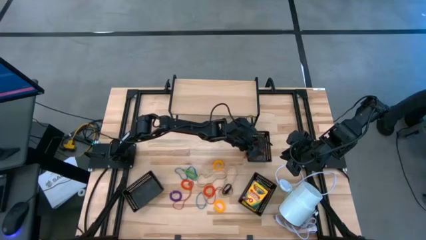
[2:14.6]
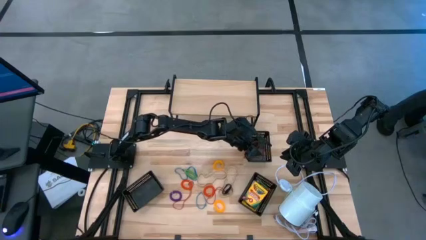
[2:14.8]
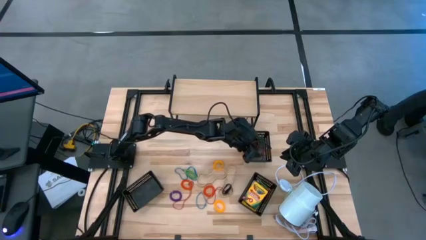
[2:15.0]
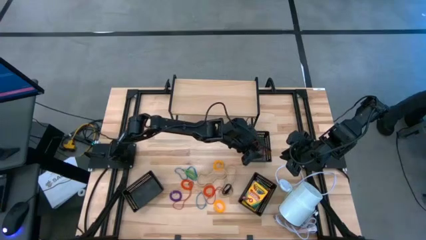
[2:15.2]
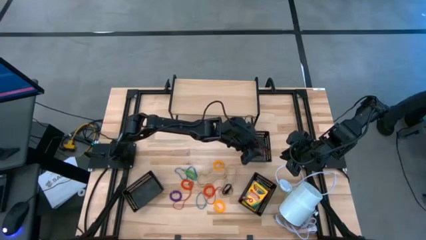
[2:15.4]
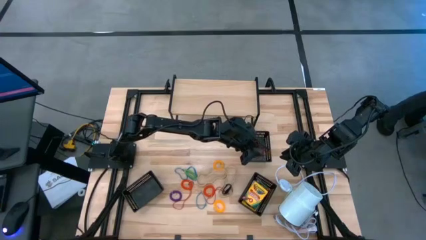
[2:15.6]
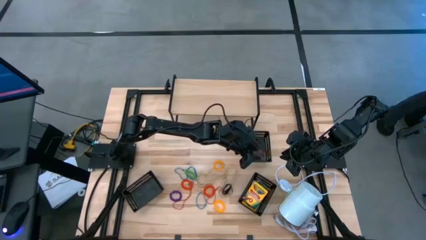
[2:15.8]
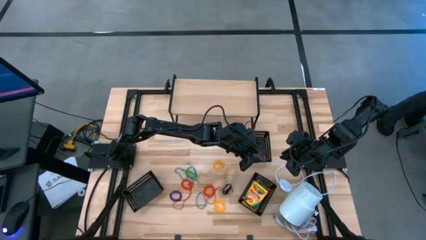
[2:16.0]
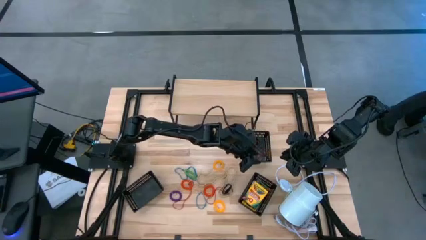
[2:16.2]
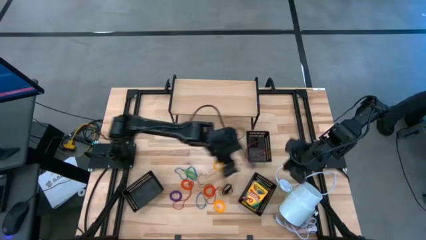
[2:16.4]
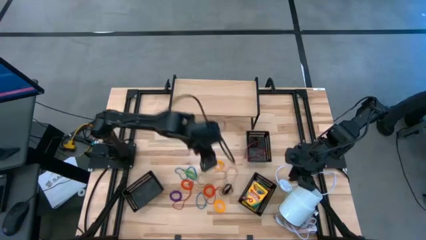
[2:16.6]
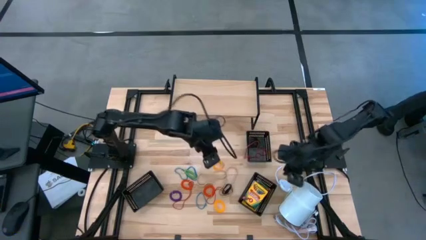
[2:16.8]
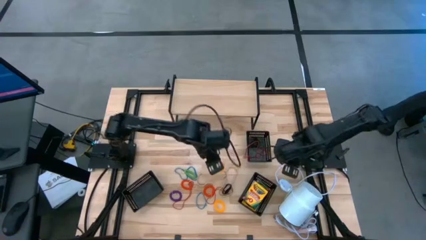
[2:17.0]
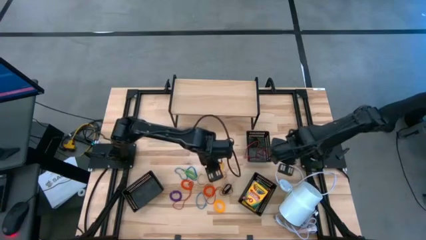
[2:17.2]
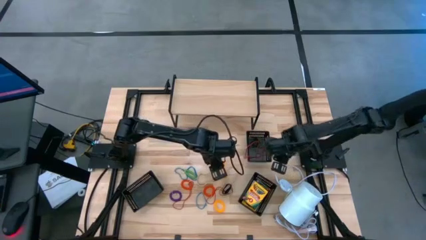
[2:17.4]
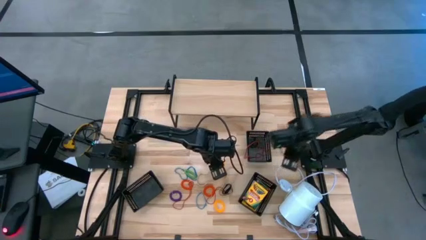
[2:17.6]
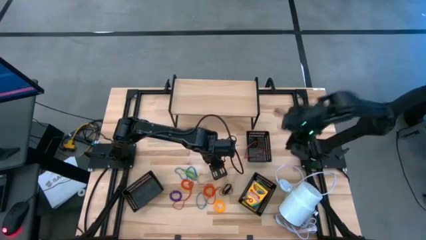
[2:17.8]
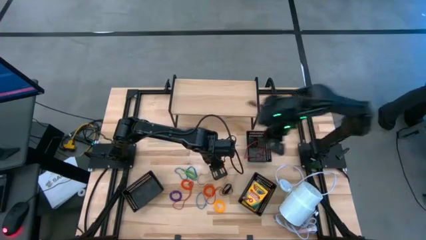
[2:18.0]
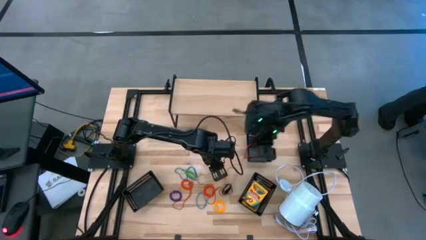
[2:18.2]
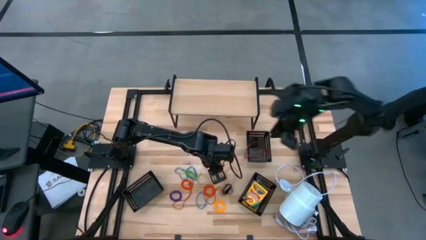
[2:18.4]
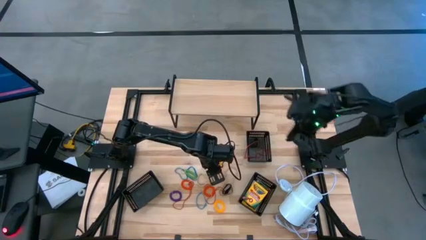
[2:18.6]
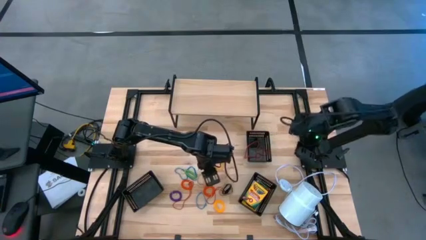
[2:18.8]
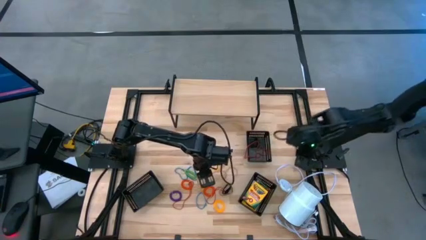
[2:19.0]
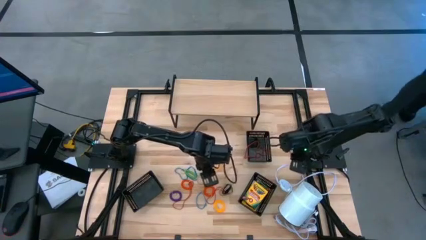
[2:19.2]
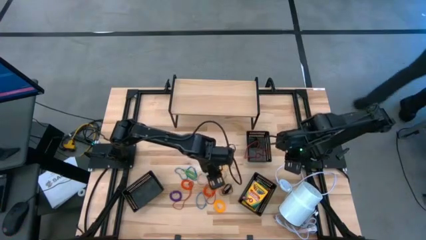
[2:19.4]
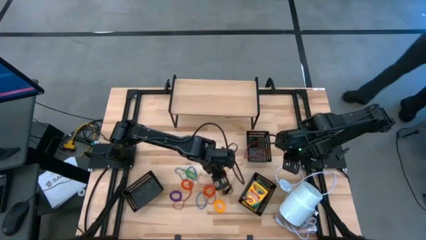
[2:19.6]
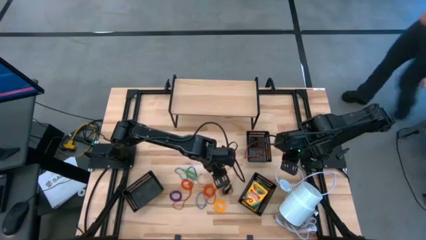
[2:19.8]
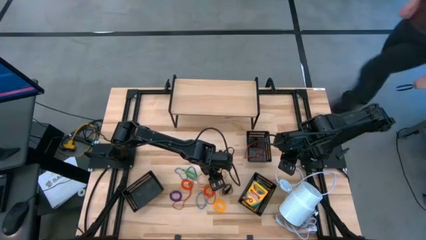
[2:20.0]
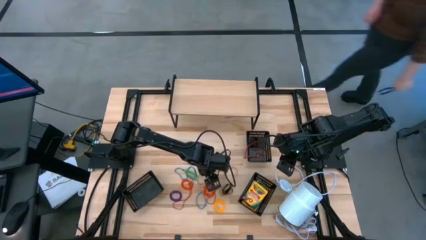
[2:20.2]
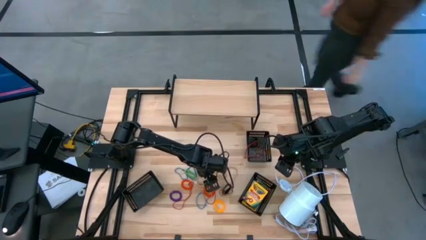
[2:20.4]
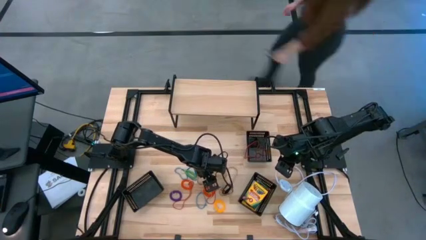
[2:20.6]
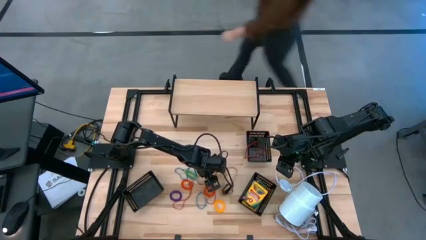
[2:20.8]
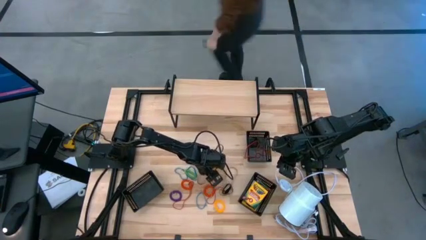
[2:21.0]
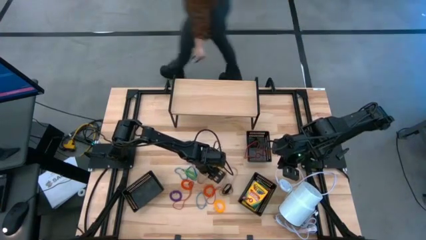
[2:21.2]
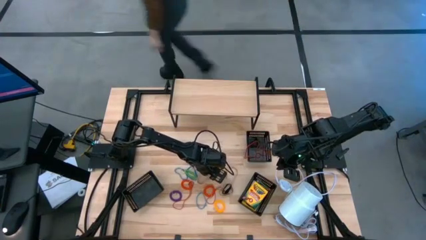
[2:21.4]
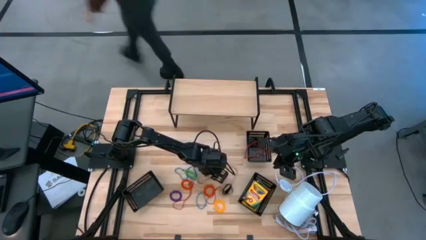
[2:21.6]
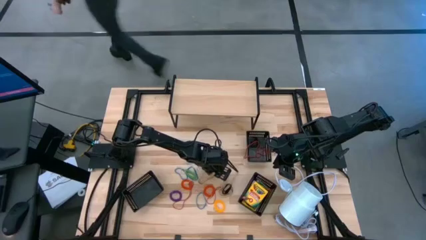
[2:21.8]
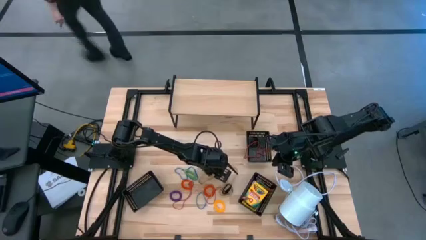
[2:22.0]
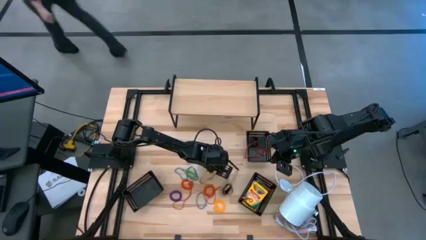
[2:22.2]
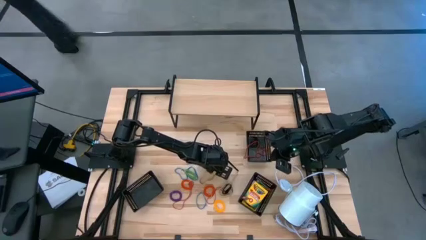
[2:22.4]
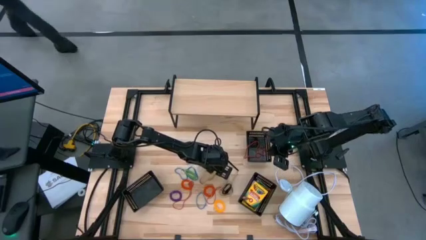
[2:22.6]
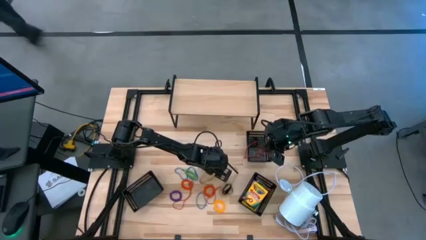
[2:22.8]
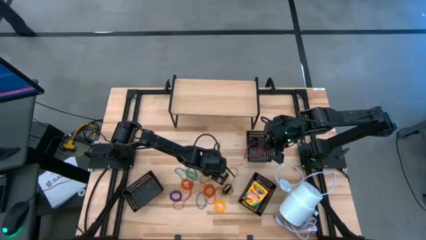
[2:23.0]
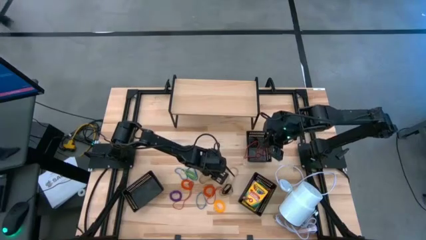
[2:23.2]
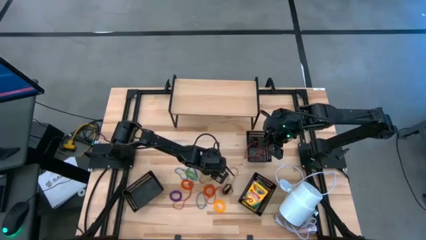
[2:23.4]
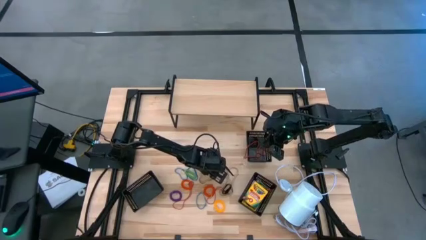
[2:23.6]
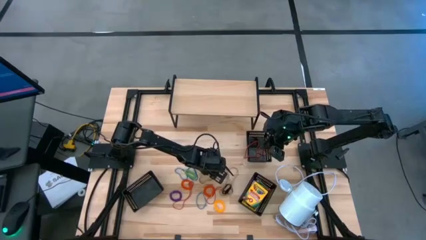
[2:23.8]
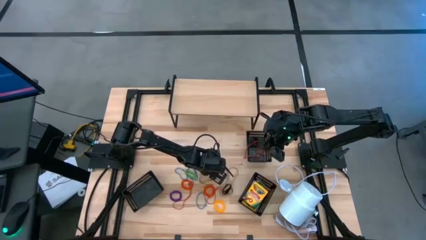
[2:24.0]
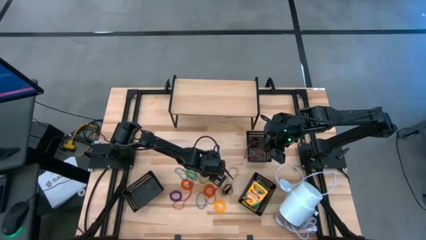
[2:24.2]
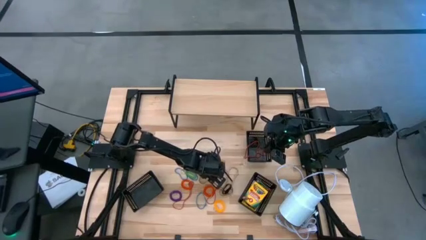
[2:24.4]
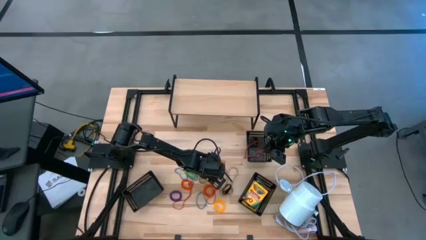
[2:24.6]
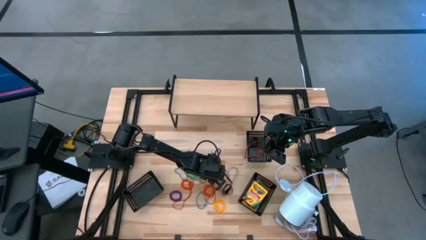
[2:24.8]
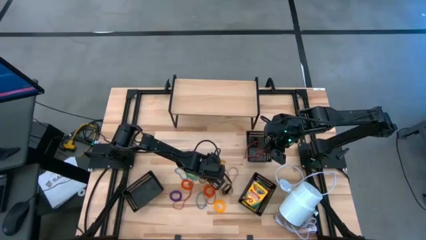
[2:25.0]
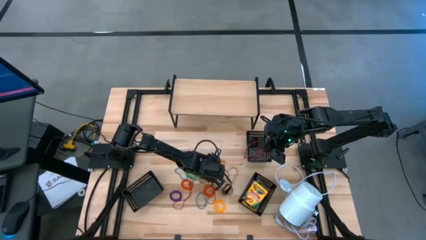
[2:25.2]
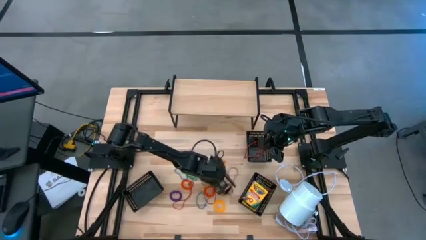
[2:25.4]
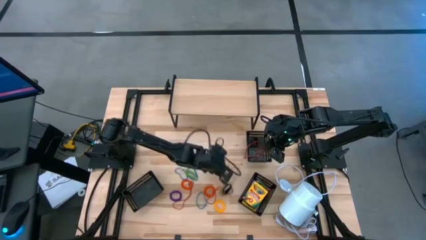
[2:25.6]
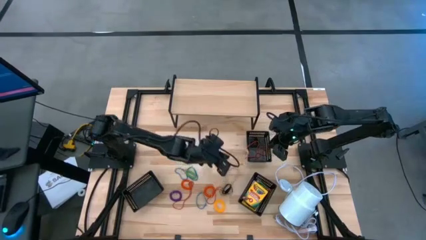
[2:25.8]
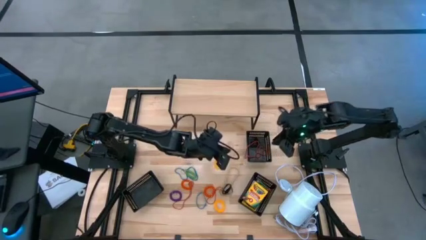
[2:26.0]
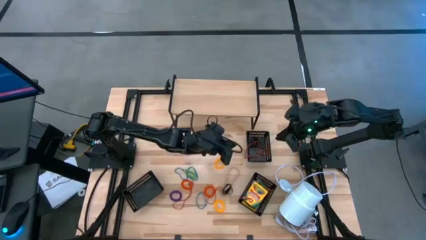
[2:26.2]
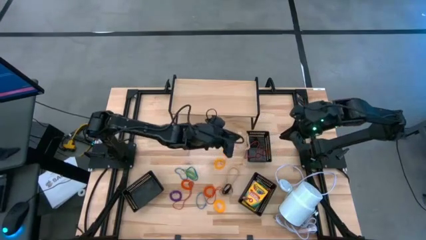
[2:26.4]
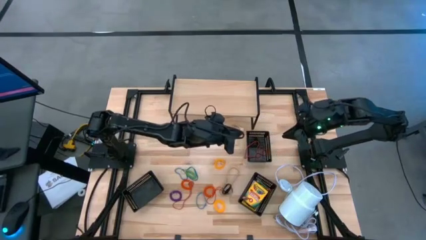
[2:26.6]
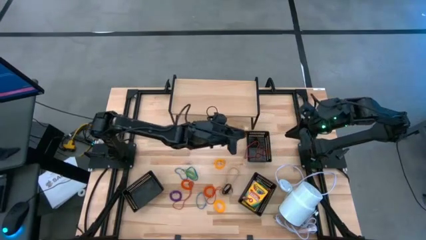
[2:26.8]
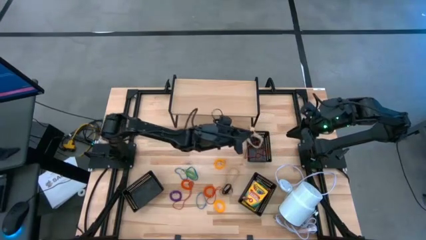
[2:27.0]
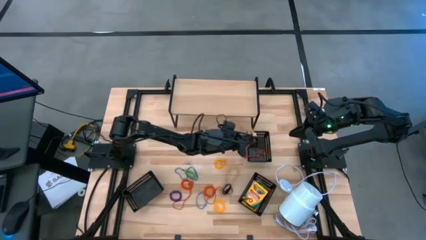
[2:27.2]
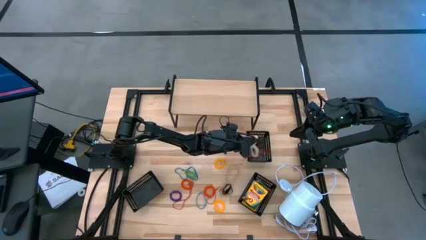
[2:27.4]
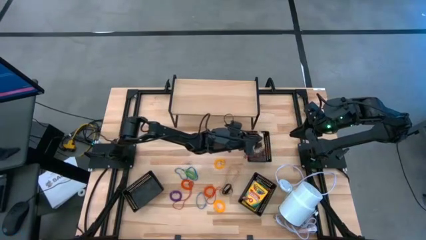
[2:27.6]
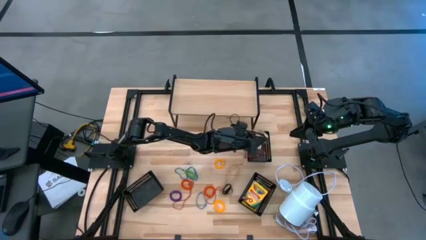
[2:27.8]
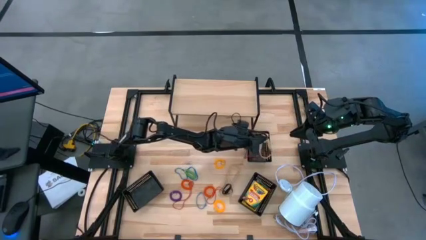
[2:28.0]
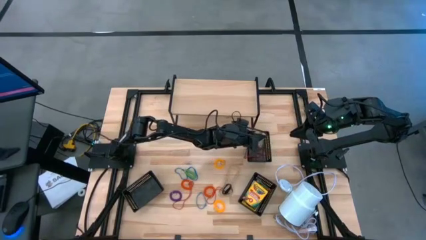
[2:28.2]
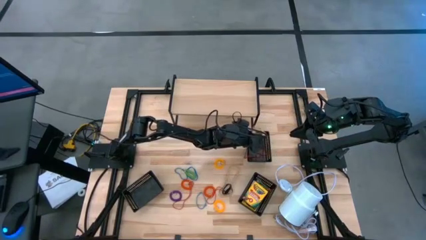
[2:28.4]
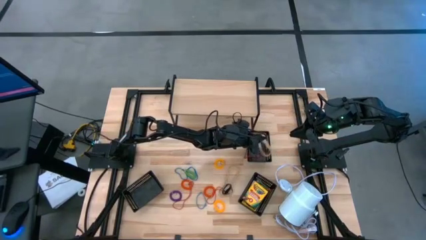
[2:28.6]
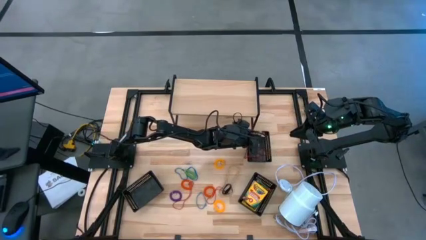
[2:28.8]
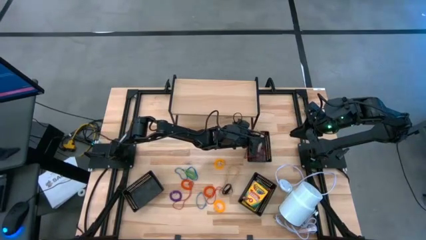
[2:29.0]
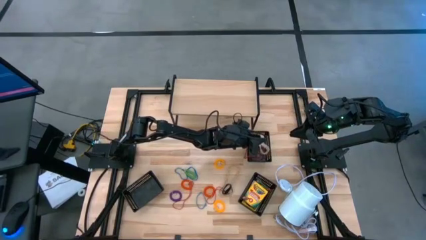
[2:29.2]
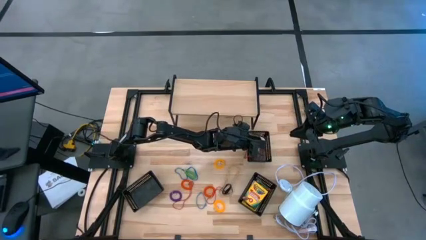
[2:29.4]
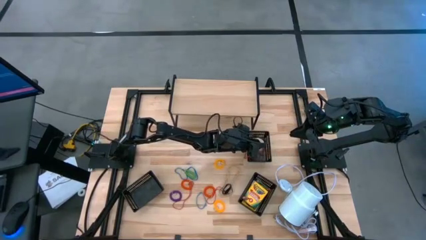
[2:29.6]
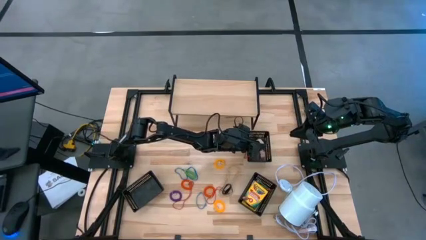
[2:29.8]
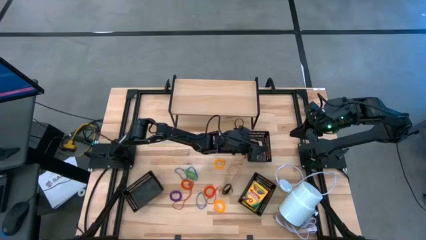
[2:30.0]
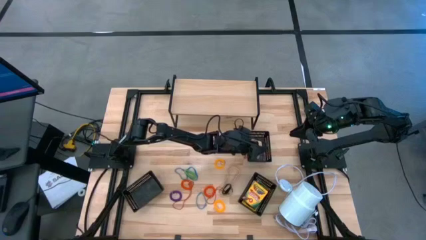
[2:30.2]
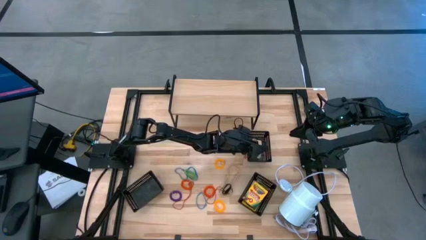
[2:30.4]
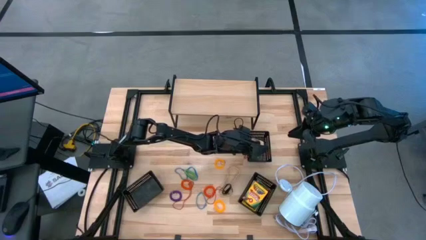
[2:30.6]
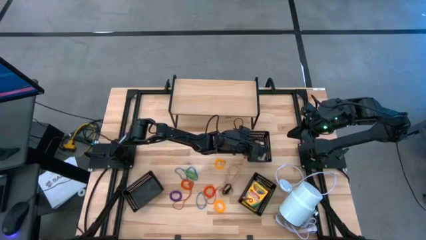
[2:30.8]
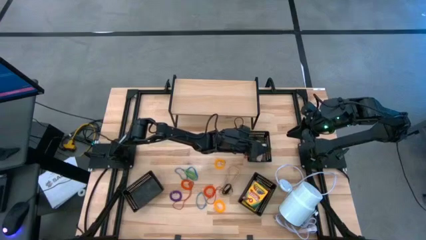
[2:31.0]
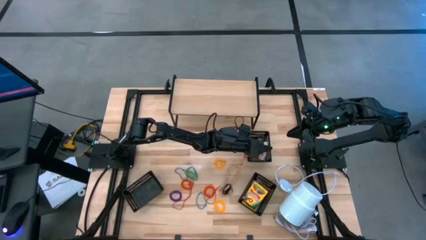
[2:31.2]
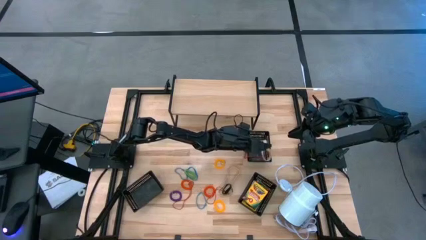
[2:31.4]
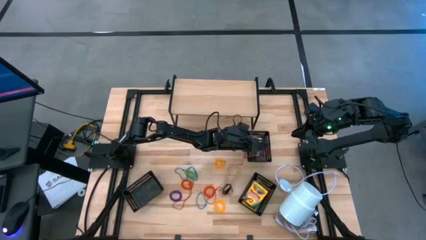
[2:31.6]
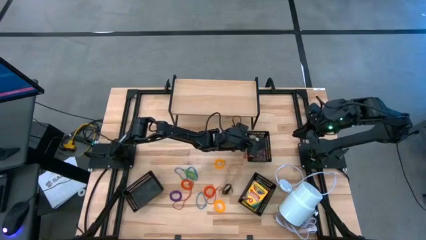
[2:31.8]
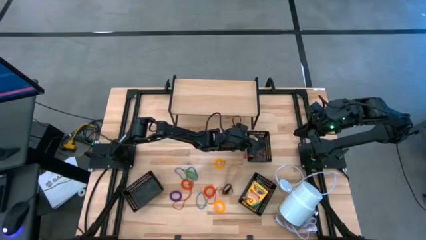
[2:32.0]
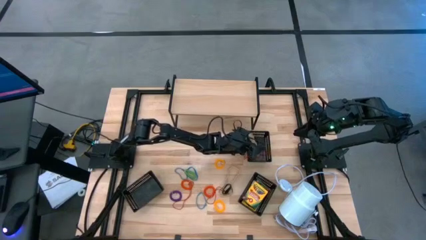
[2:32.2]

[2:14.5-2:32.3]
Task: Pick & Place Office Desk Supplies
Put the left white rubber band into the top right black bin
